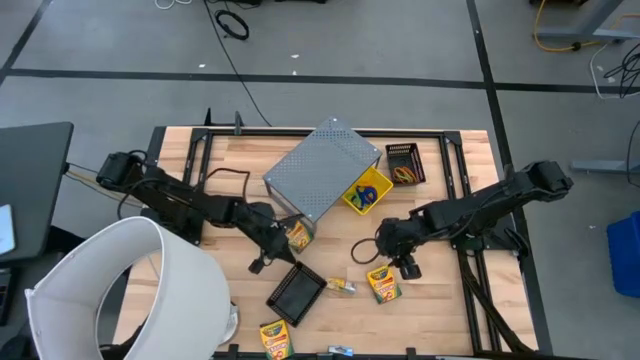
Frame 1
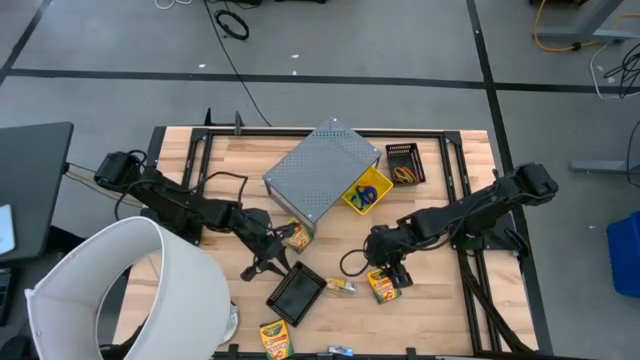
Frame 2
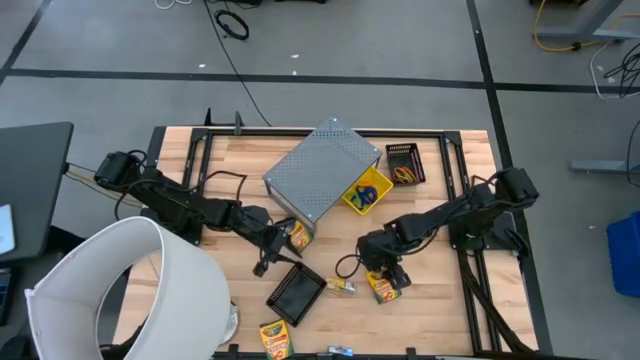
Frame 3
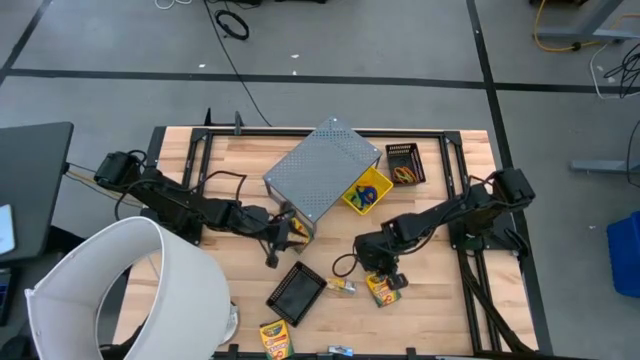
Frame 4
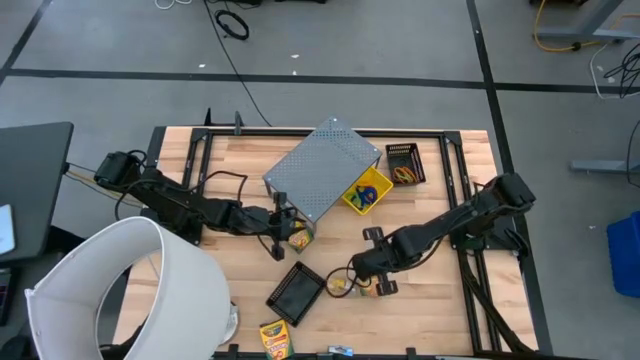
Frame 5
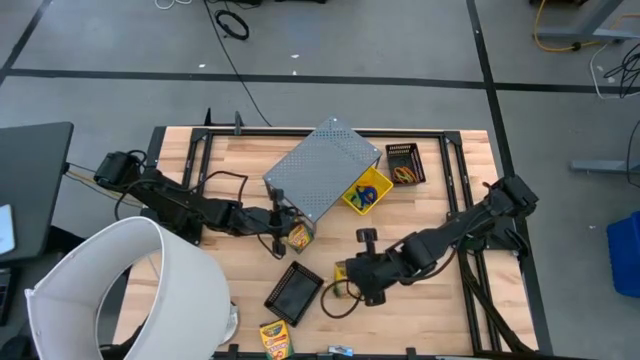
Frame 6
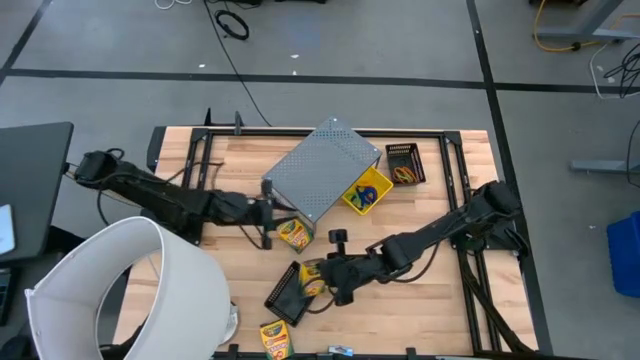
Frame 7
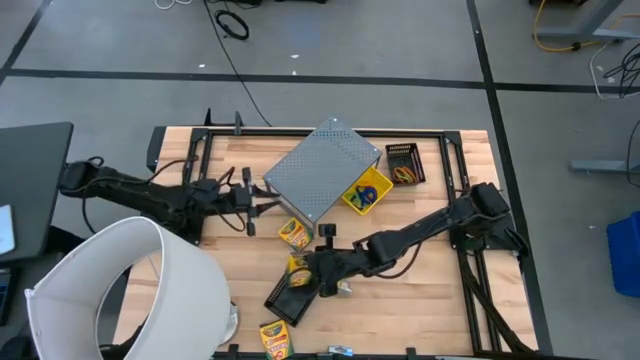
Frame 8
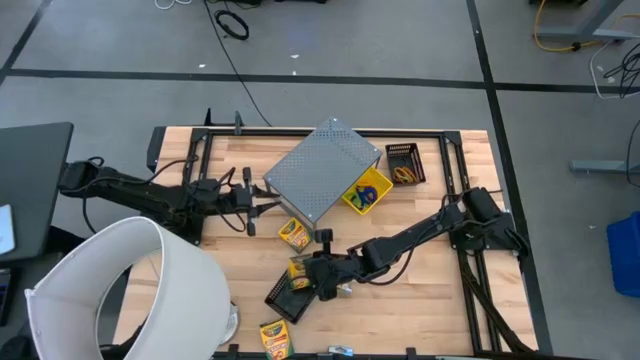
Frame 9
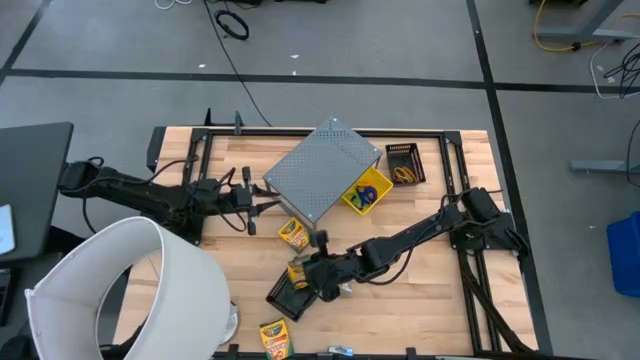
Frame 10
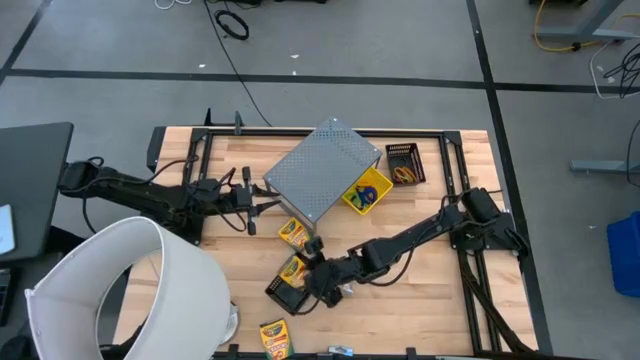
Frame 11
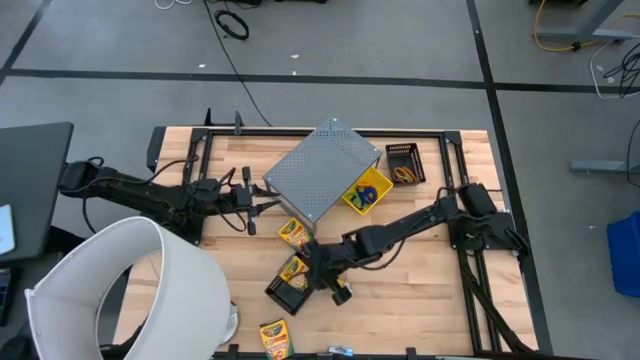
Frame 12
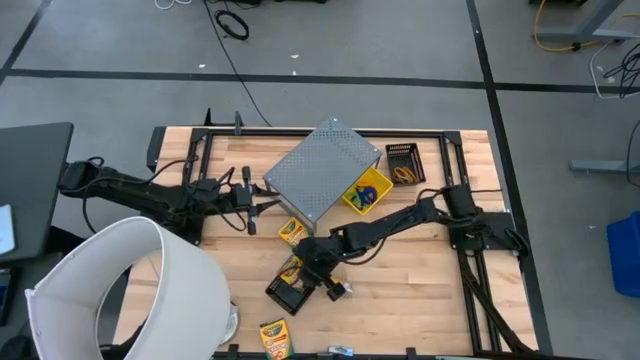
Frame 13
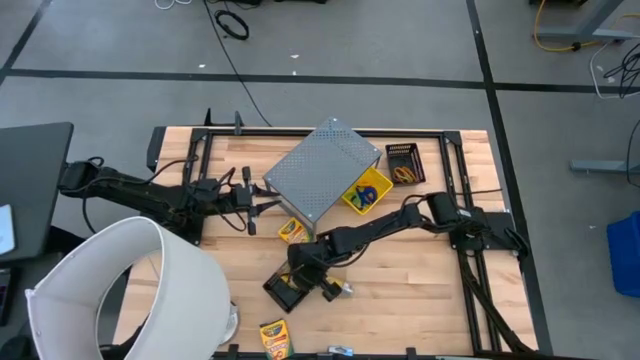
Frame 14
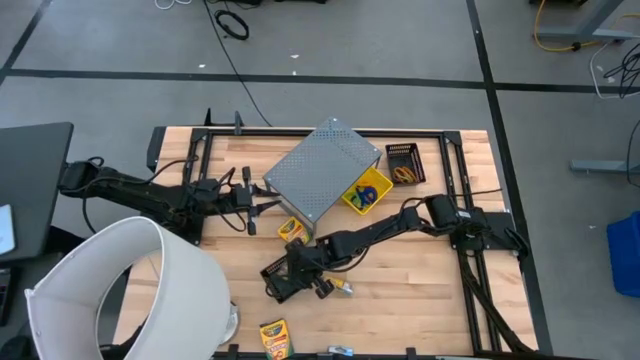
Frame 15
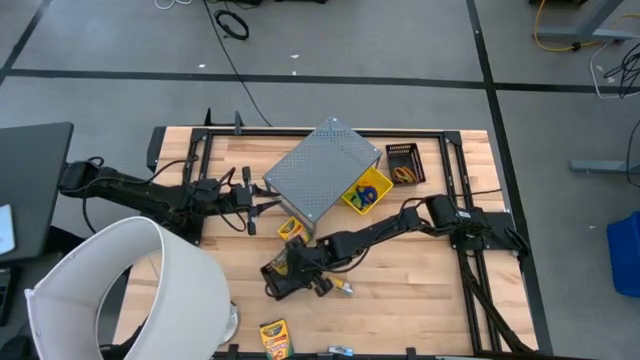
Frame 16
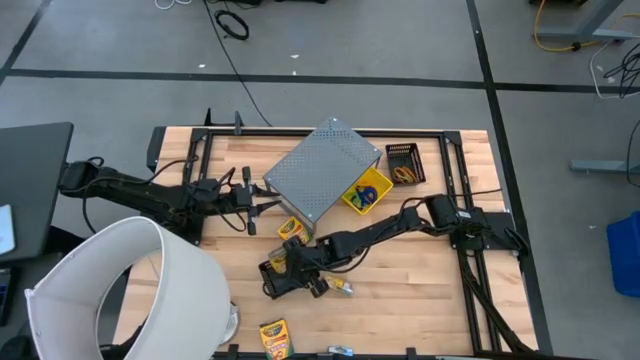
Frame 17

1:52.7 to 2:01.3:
Task: Pick & Place Office Desk Supplies
Put the crayon box into the bottom black bin

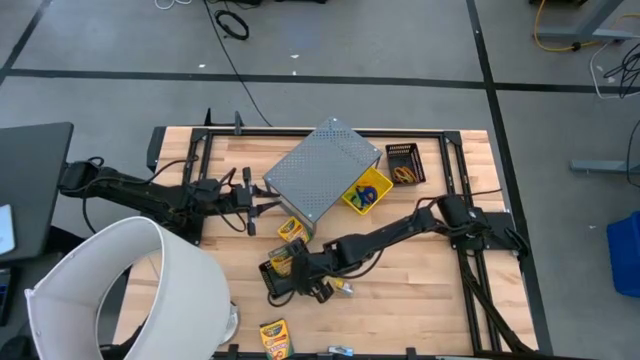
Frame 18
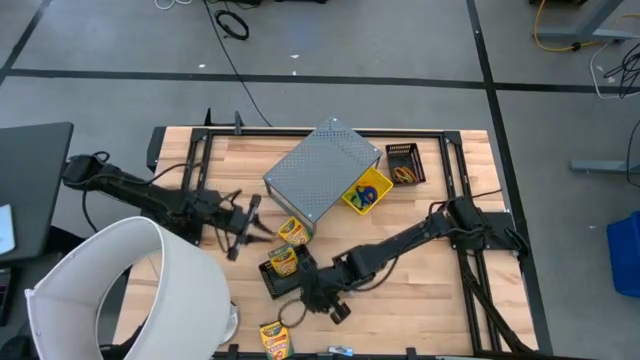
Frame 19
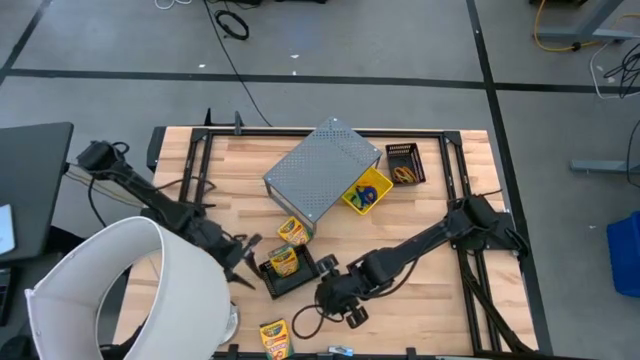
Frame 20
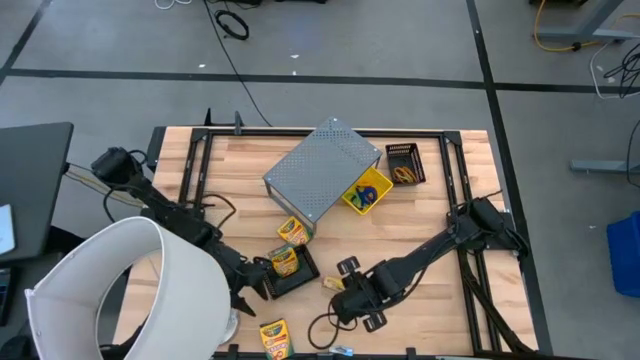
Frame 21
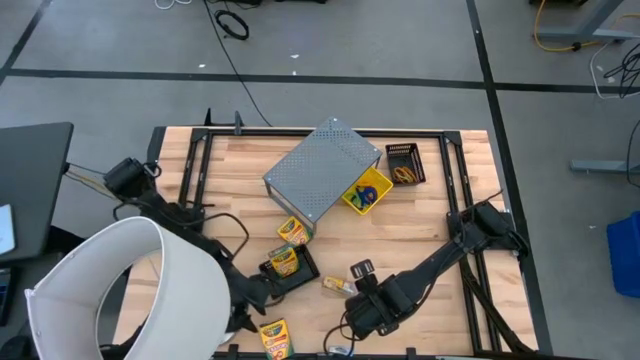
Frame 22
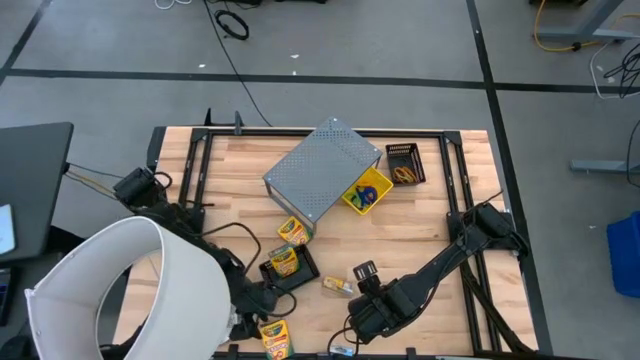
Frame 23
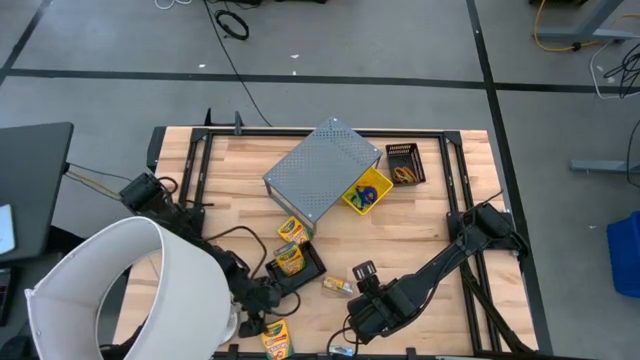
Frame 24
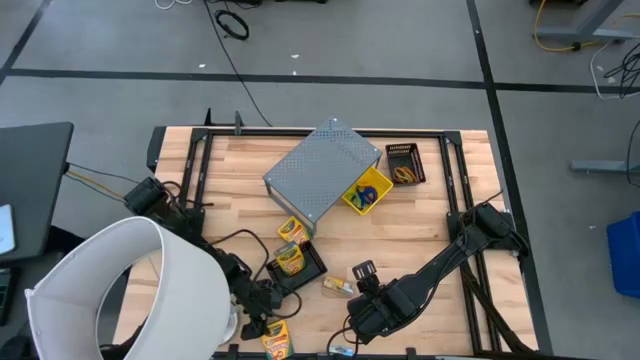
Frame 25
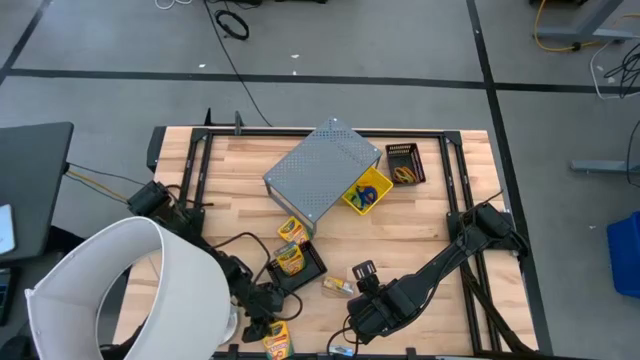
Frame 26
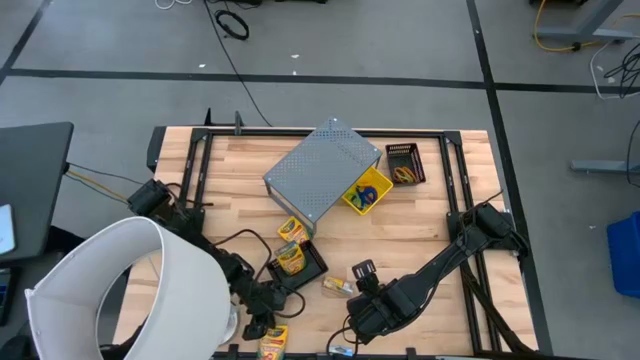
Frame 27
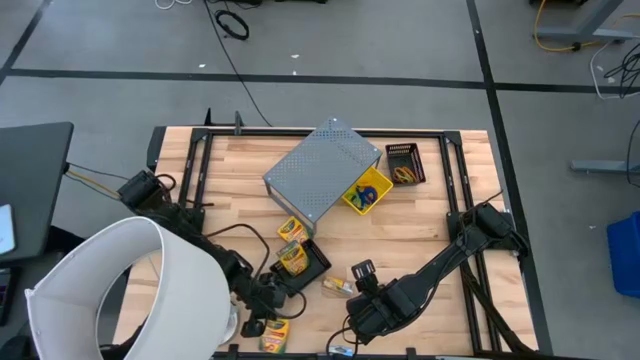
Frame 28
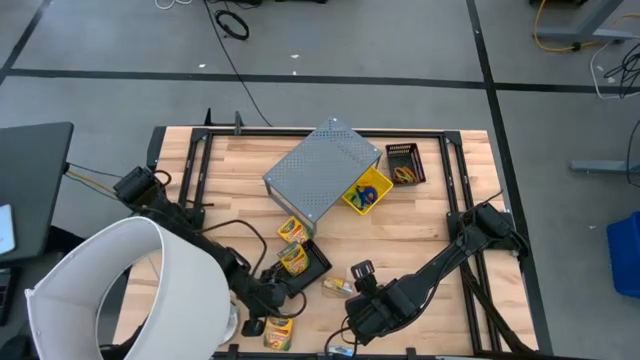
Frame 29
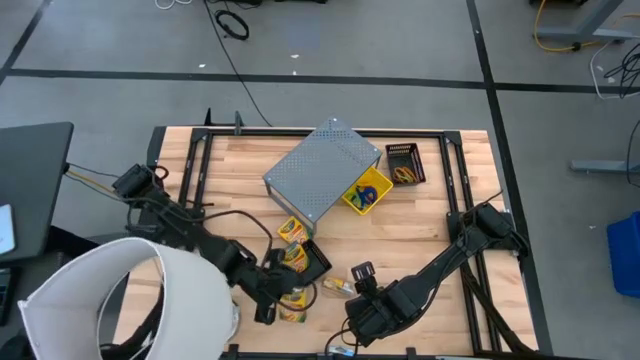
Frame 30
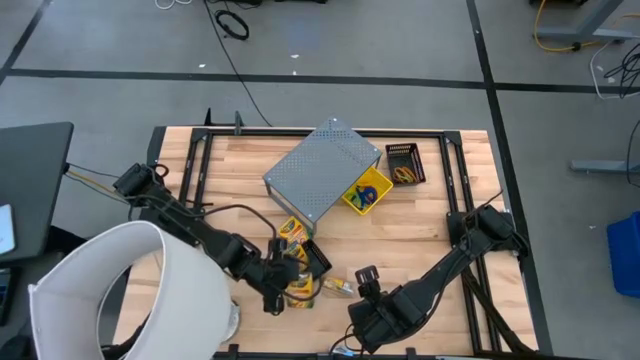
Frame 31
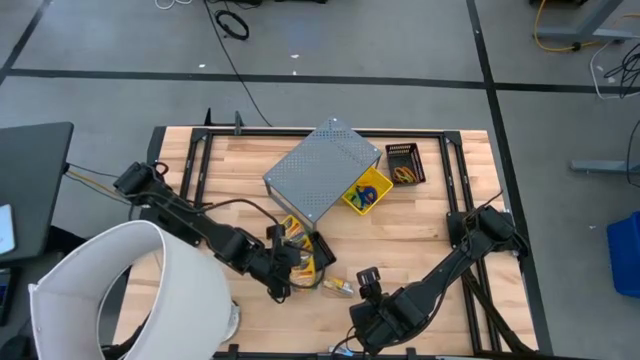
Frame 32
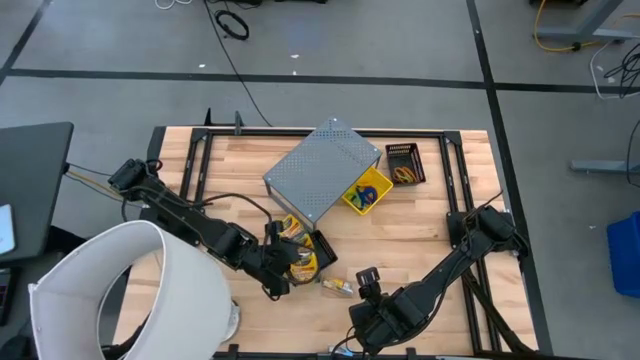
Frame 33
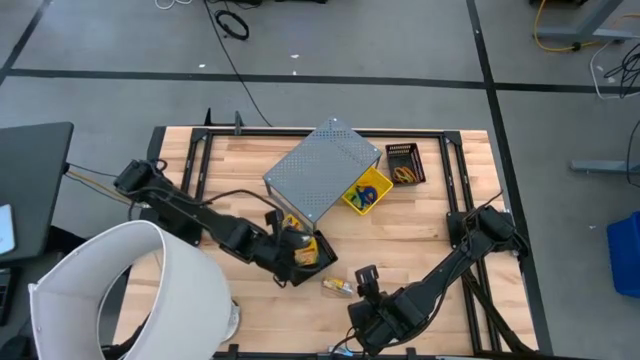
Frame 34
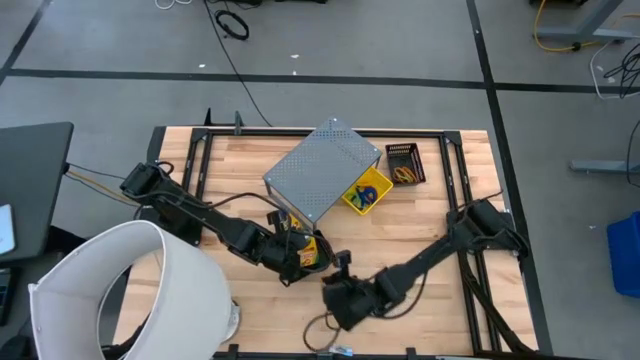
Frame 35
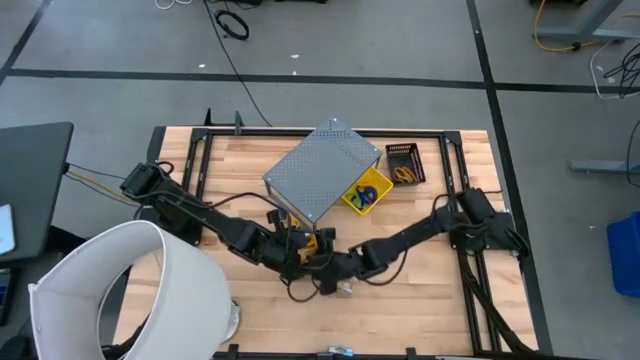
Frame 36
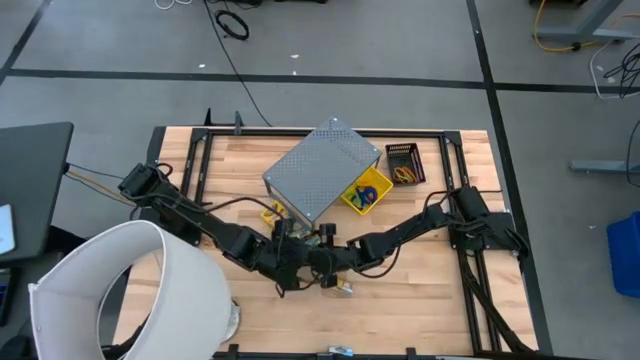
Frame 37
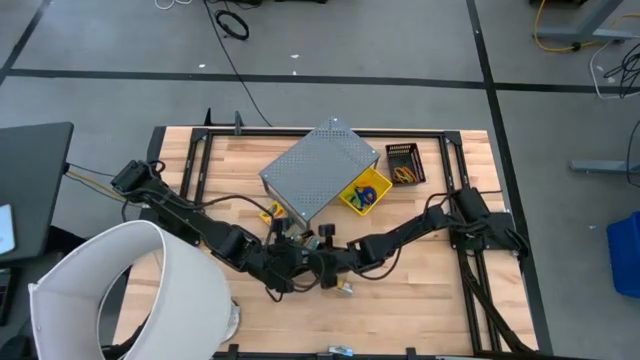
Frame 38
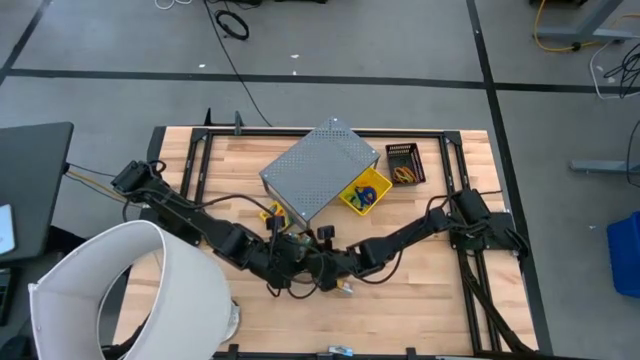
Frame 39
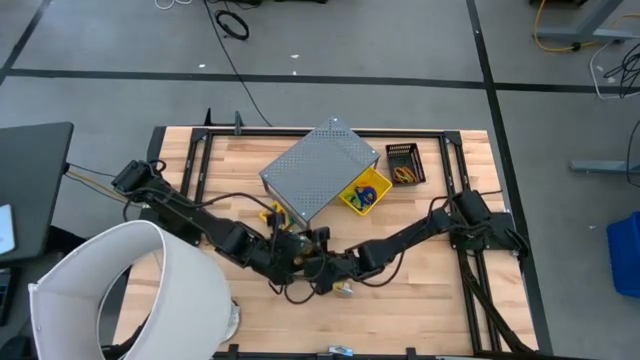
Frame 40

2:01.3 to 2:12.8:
Put the crayon box into the bottom black bin

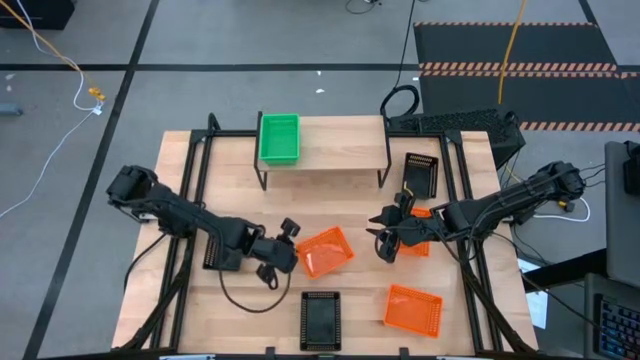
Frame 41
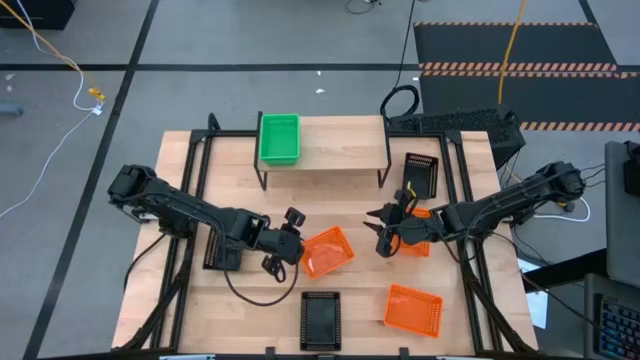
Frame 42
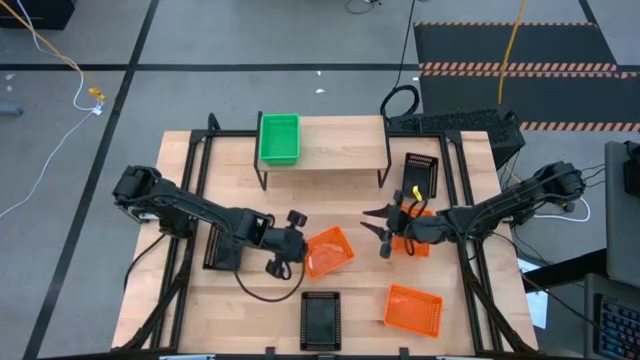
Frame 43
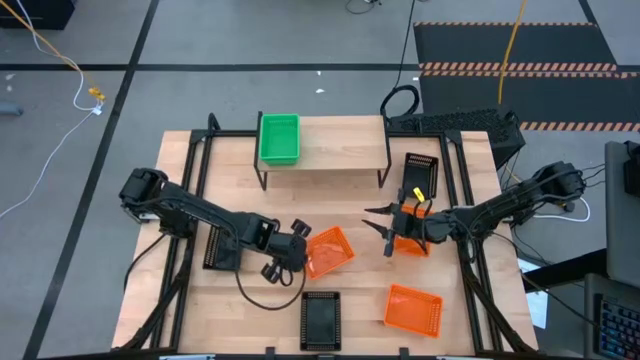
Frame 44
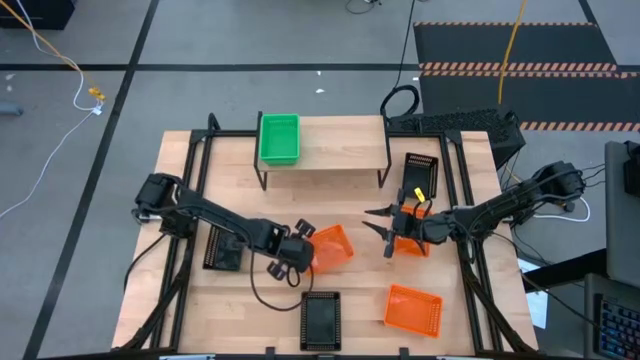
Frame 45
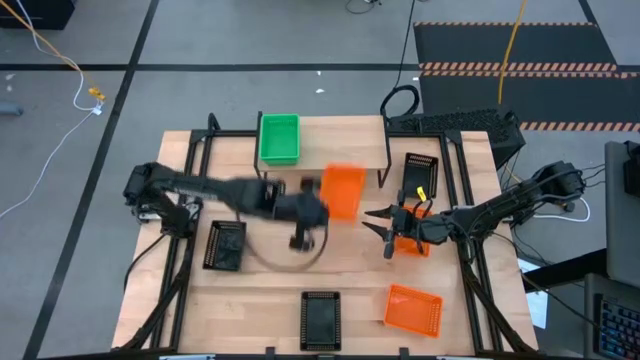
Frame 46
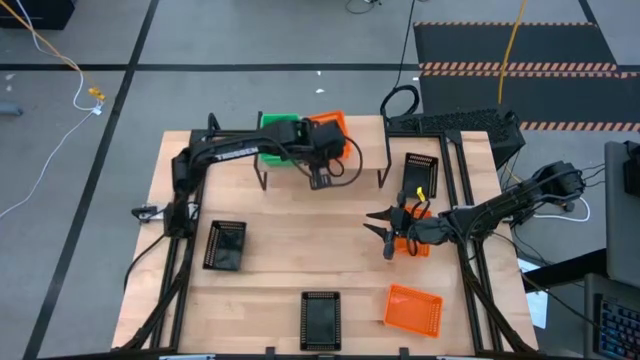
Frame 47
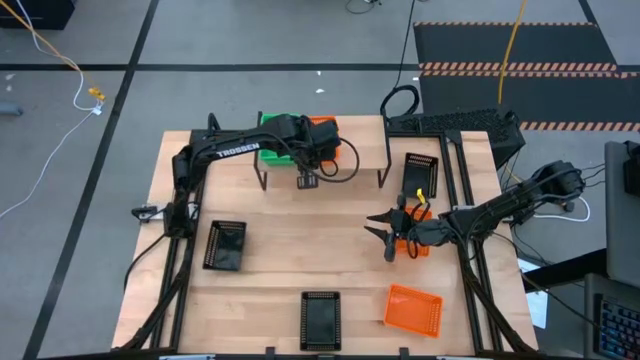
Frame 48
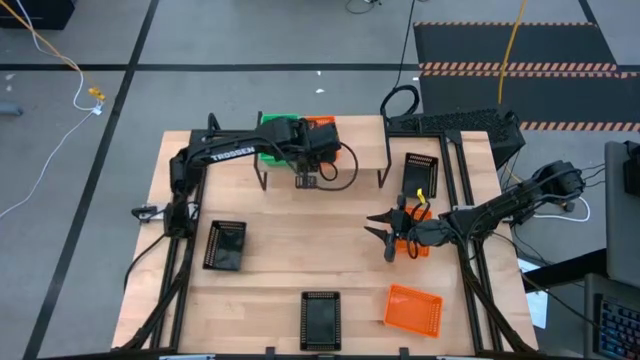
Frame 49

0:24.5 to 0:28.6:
Task: Stack baskets on shelf by color
Stack the top left orange bin on the shelf
